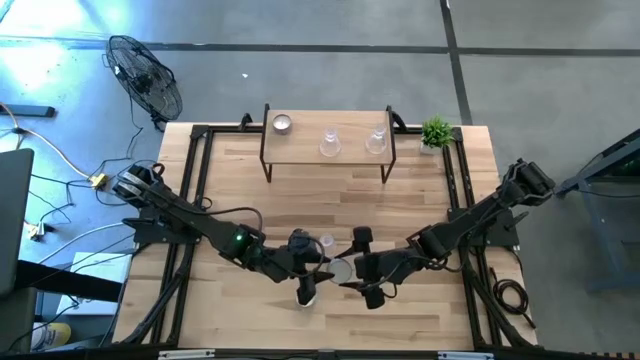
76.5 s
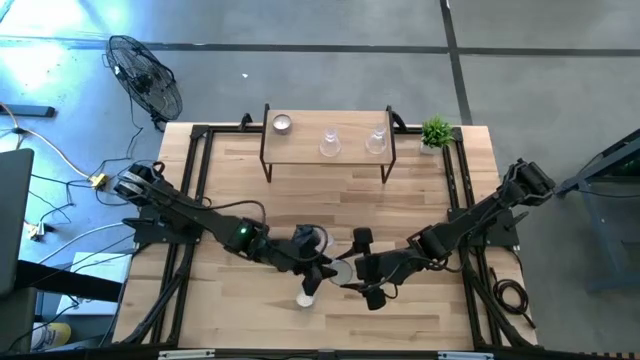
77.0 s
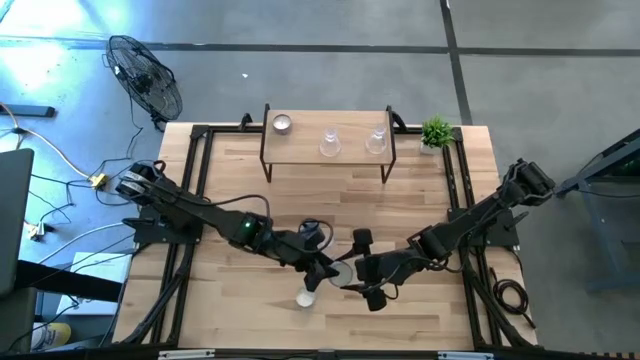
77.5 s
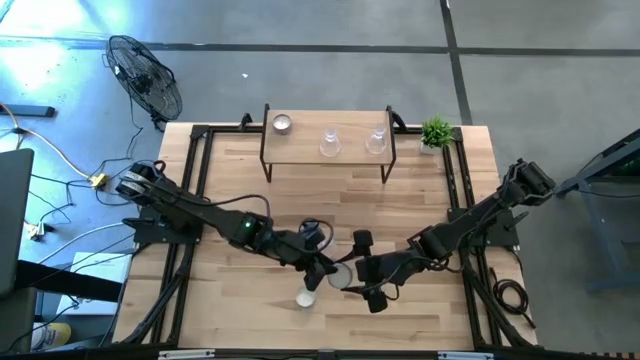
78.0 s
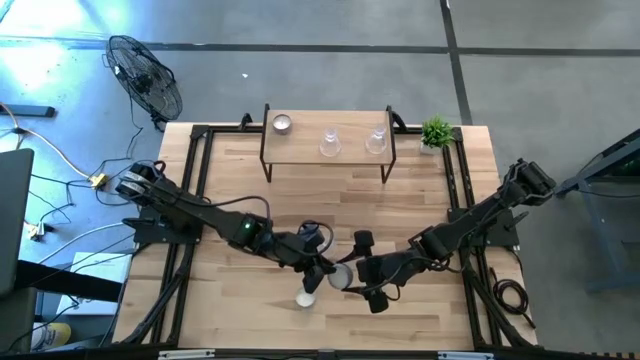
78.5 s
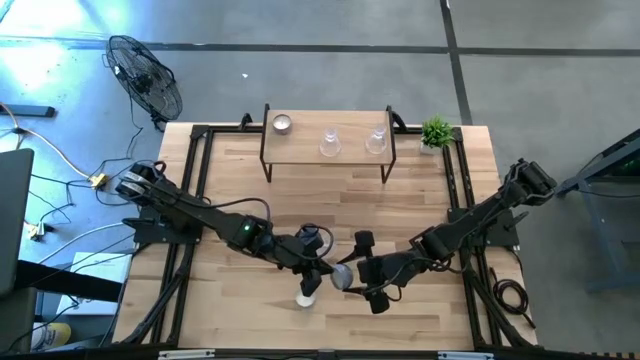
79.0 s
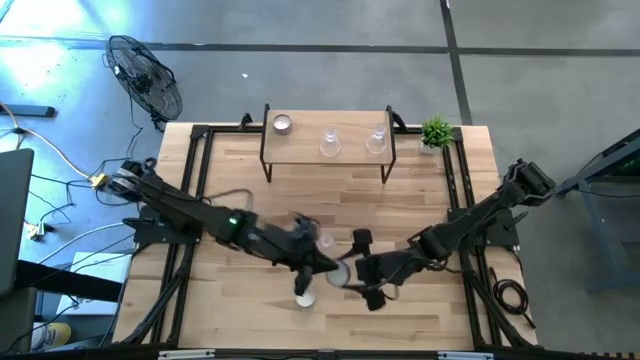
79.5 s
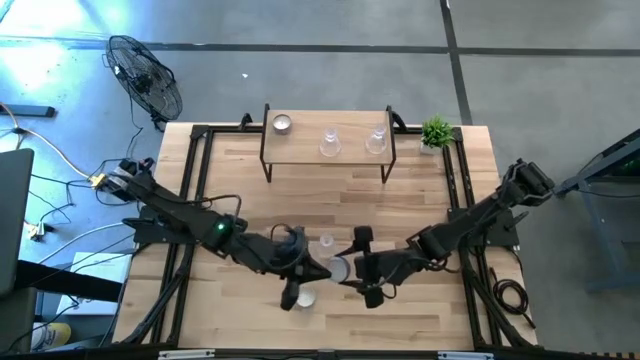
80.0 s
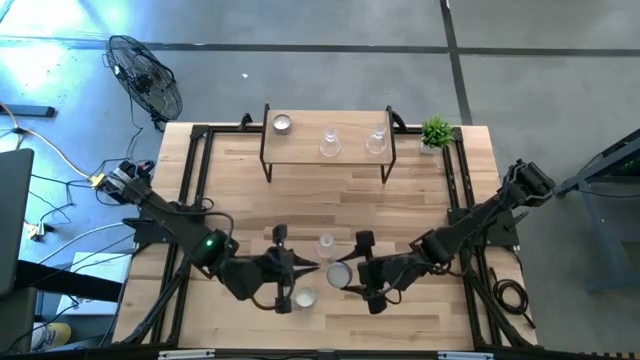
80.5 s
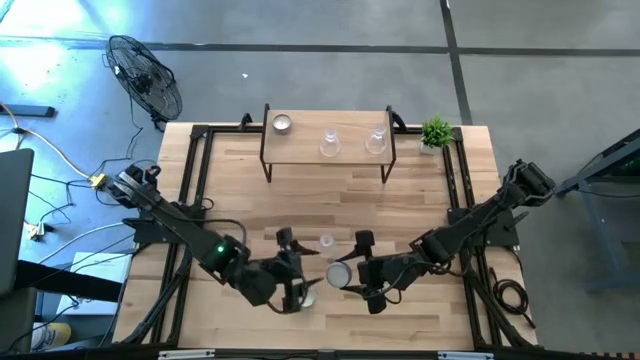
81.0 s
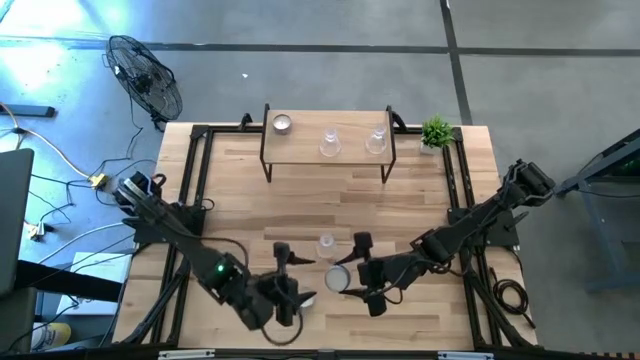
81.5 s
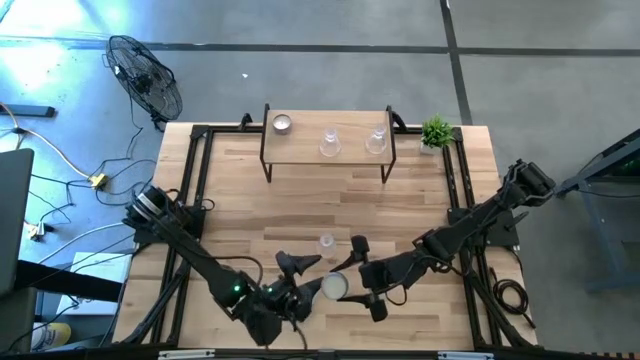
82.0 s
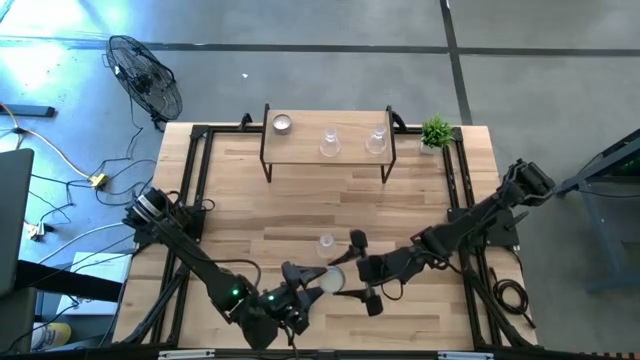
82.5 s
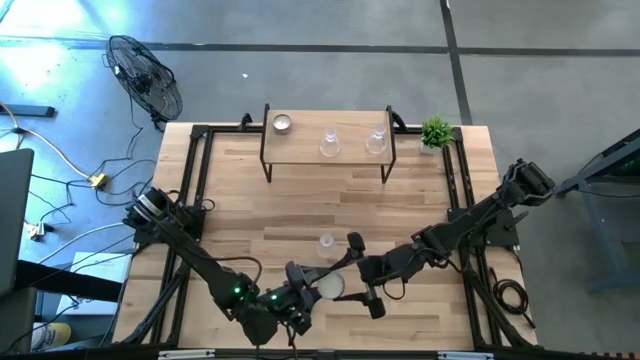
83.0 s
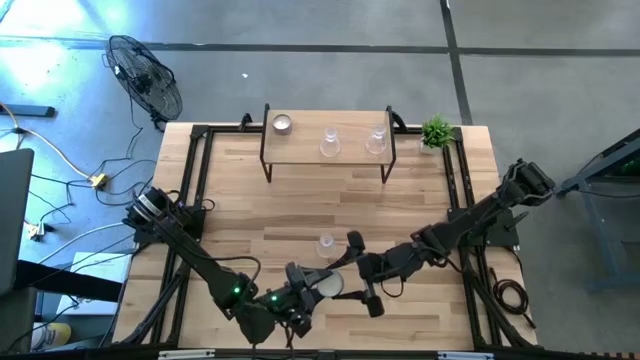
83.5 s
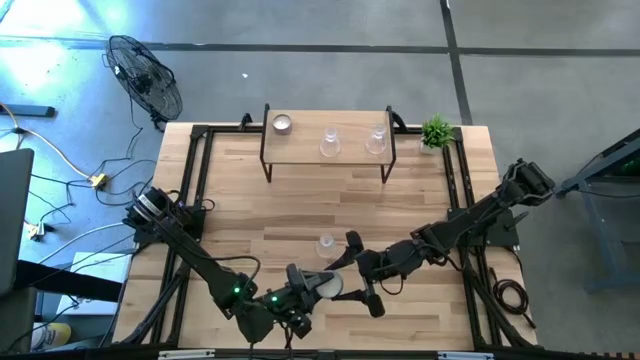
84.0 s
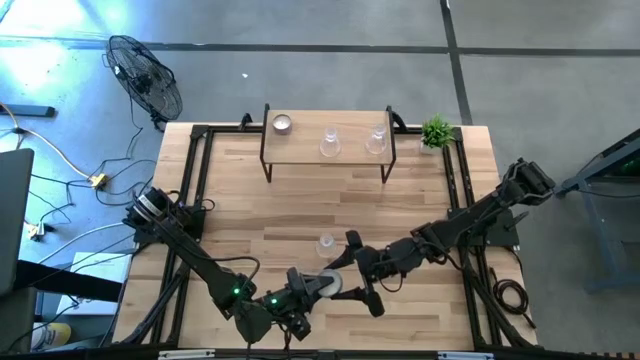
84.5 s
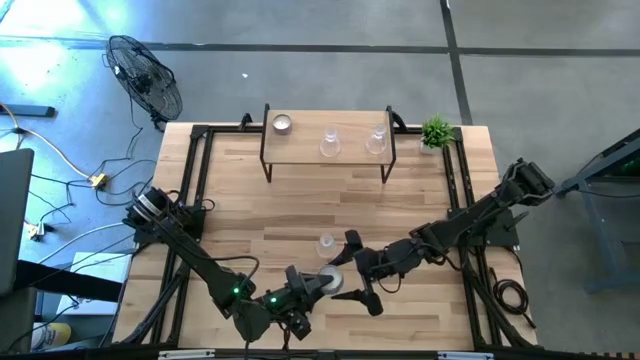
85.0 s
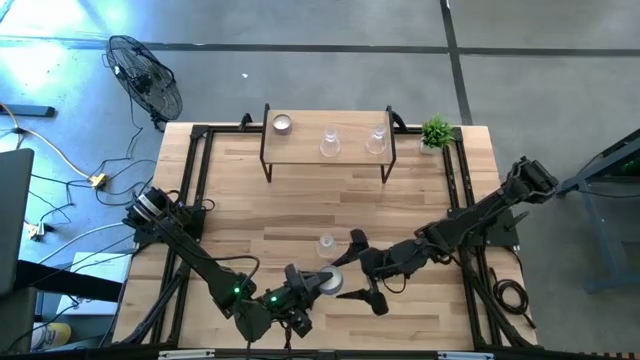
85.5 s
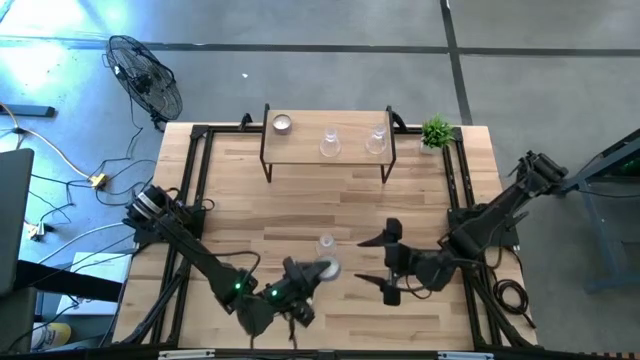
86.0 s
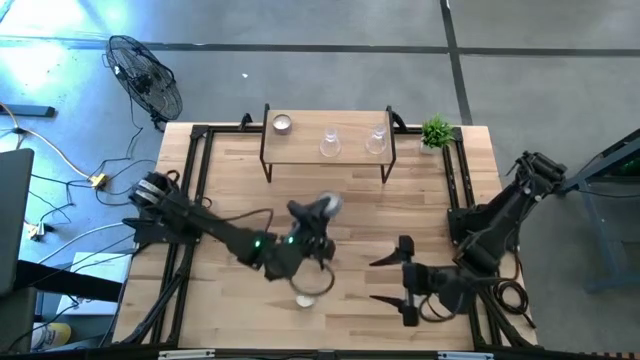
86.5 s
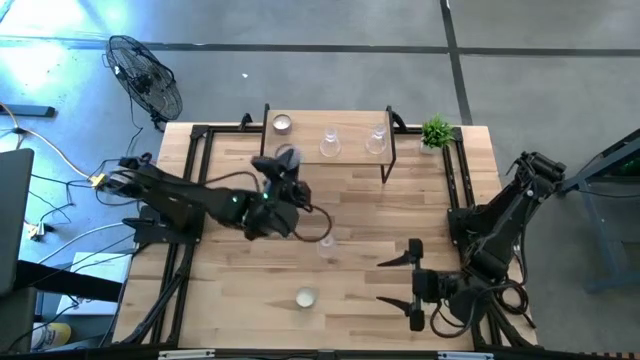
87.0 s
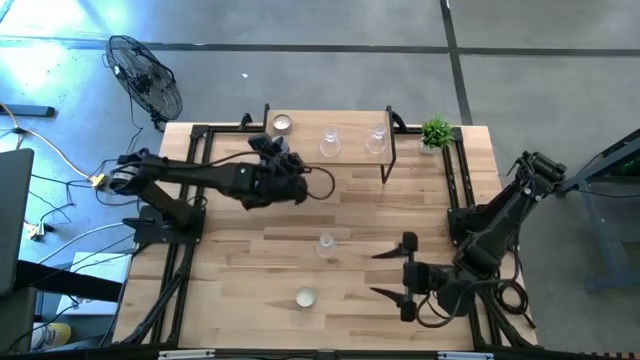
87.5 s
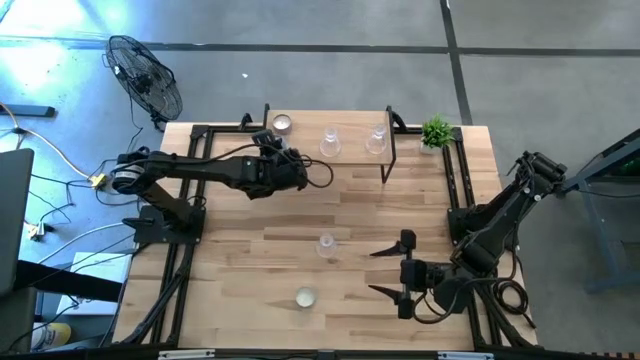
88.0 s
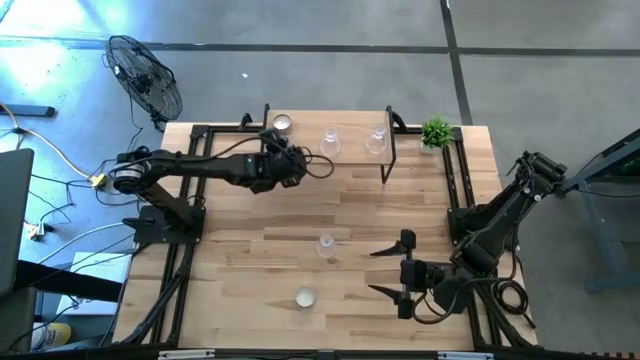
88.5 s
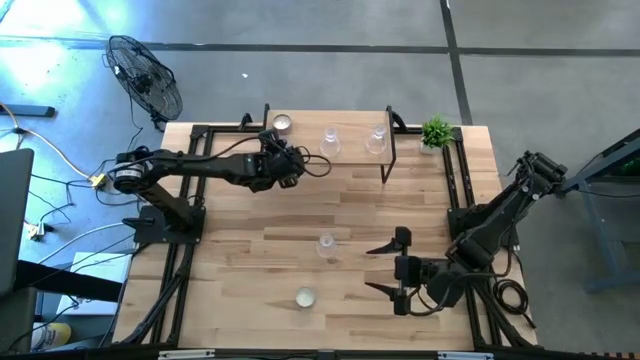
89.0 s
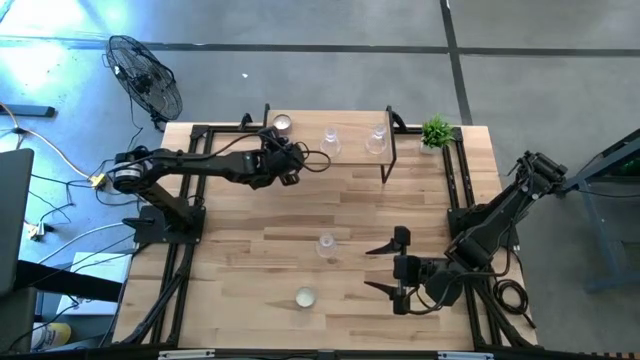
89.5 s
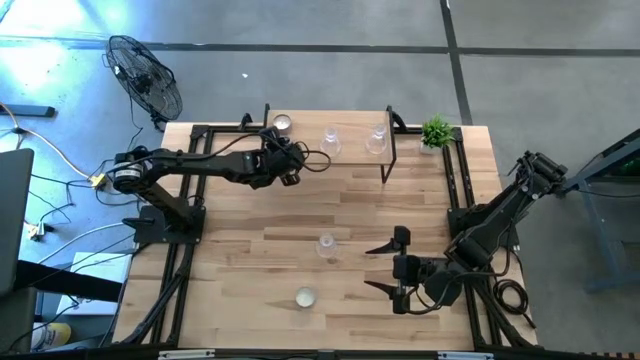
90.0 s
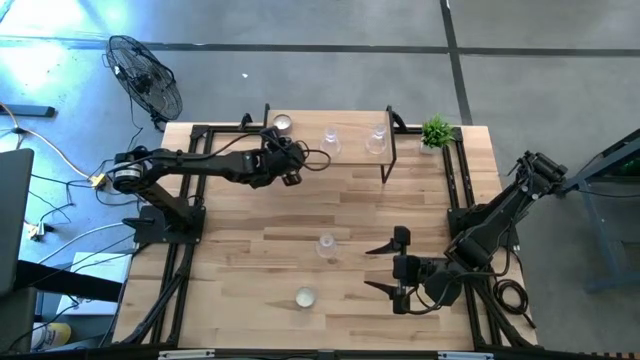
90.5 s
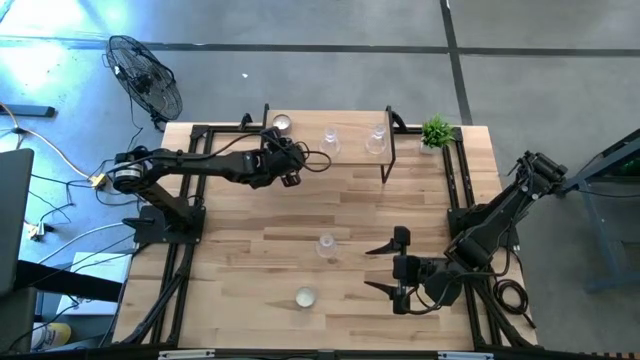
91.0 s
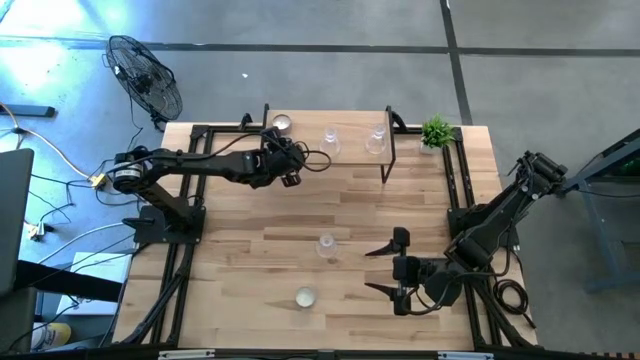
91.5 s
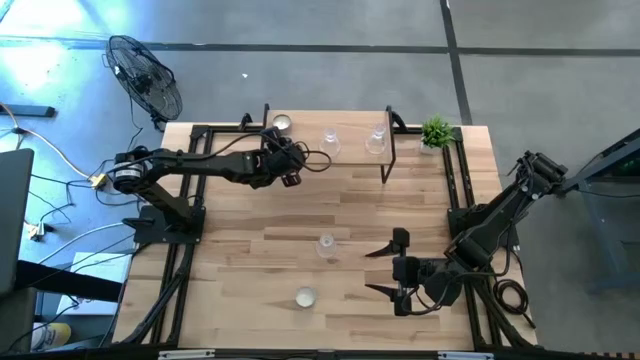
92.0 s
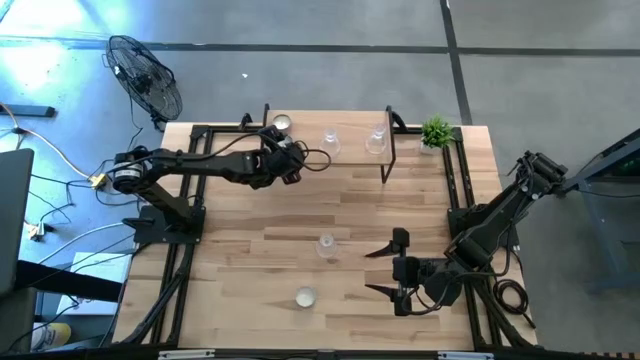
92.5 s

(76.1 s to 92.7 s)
Task: Pick & Place candle stick holders
Put the blue patterned scented candle on the shelf

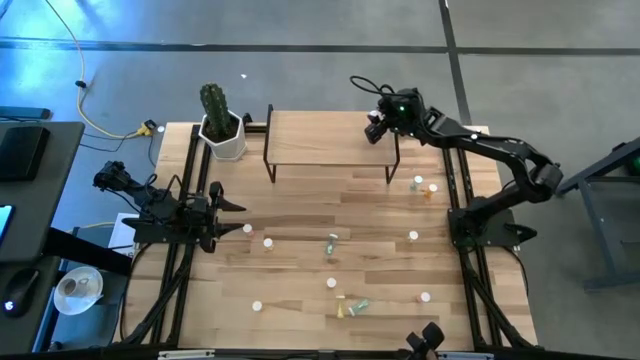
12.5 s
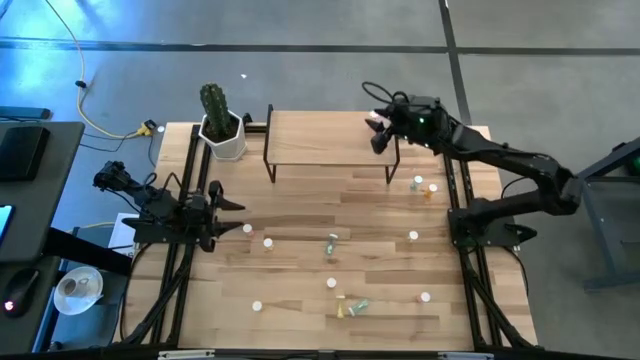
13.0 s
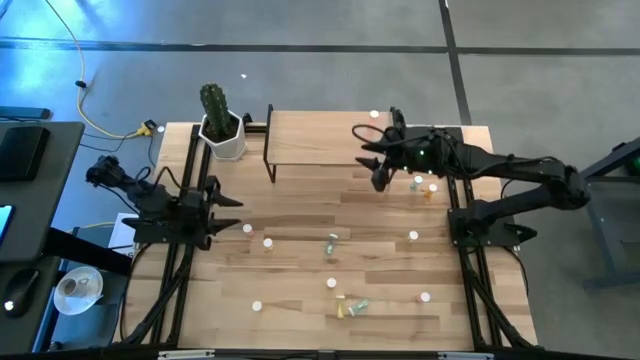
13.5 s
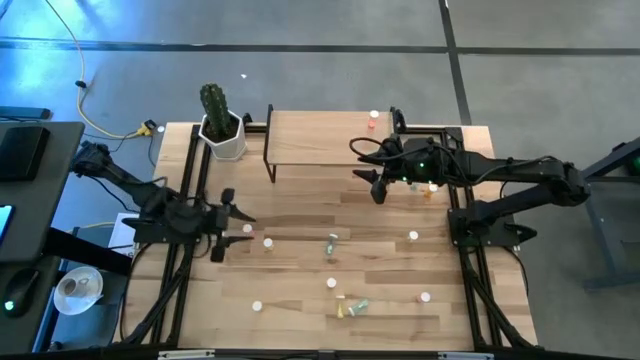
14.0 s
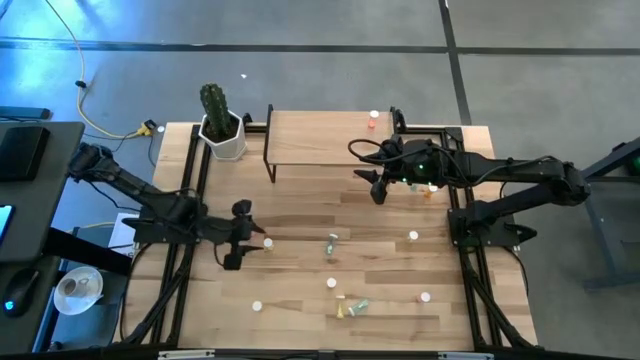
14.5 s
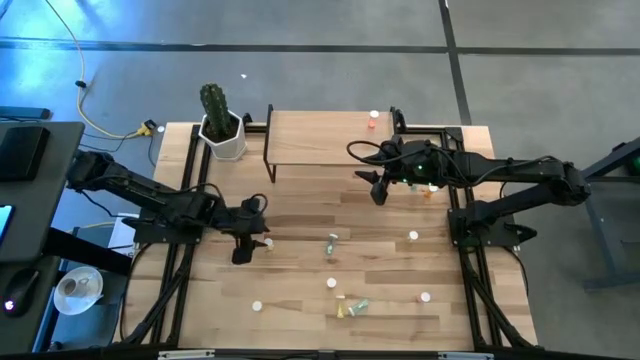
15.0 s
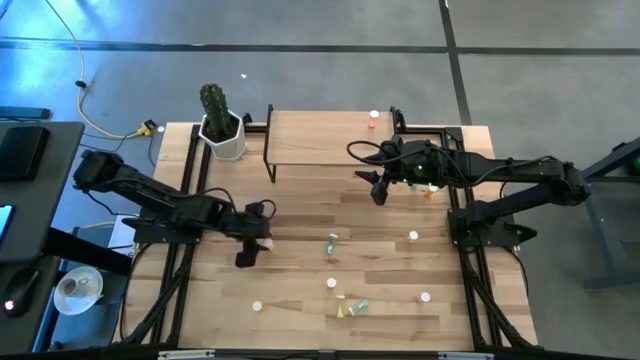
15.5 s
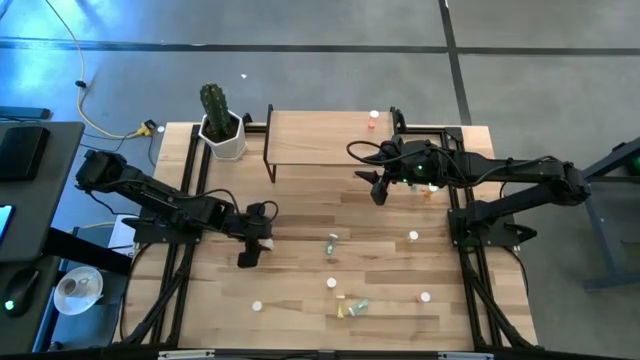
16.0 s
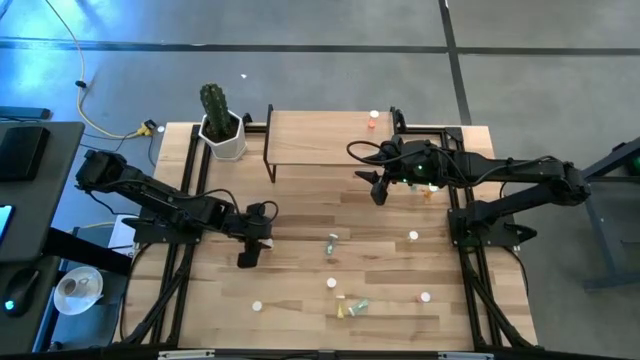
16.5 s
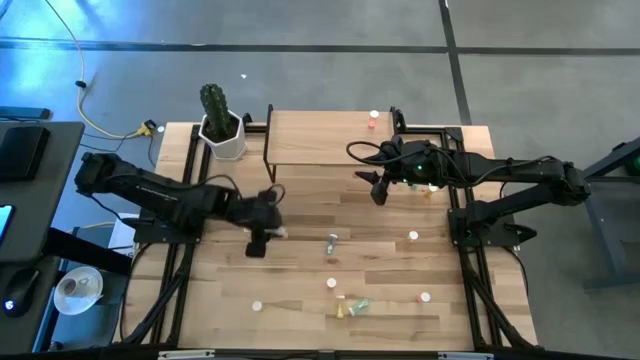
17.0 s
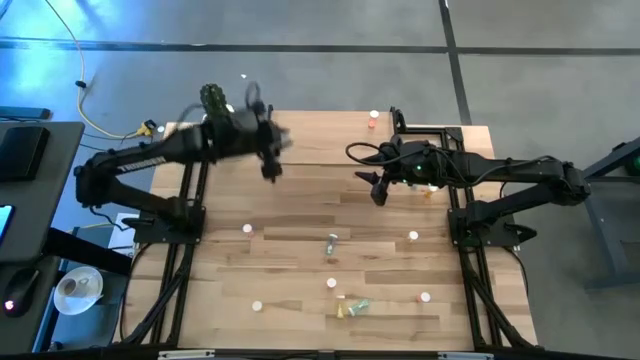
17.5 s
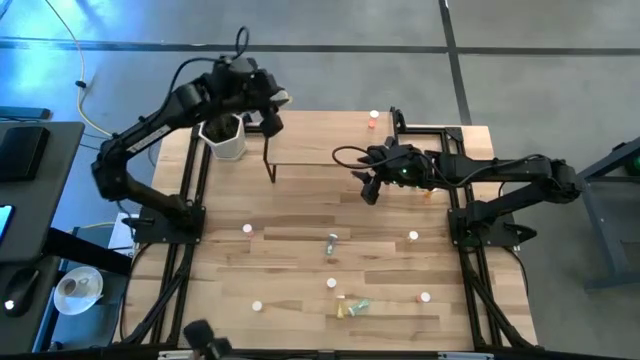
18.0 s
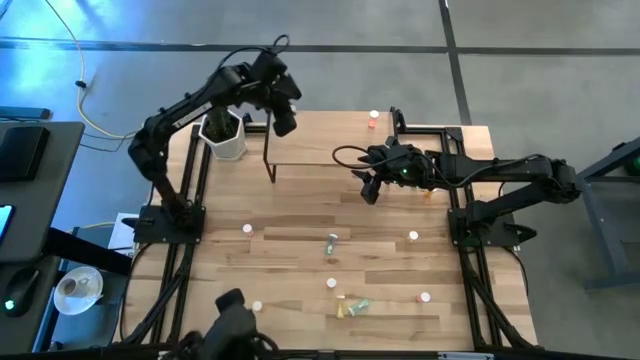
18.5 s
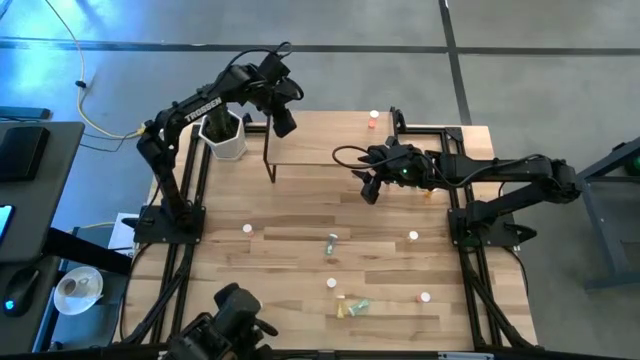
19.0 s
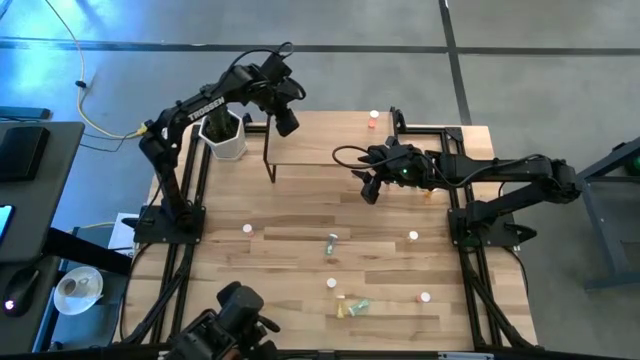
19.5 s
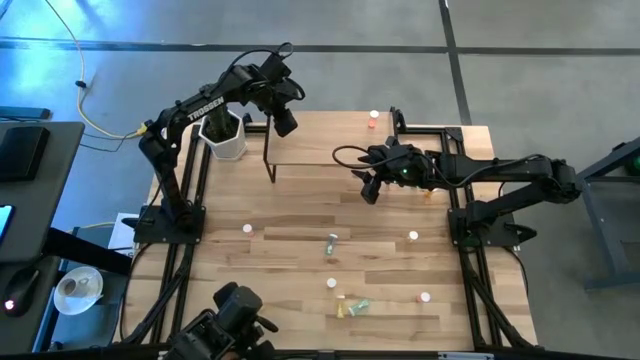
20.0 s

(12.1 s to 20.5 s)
Task: Pick and place medicine bottles onto shelf by color
Put the middle left yellow pill bottle on the shelf
